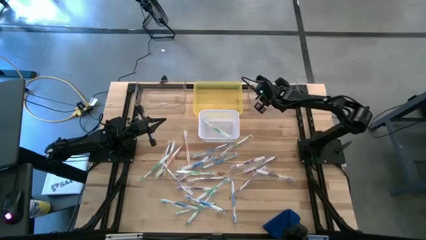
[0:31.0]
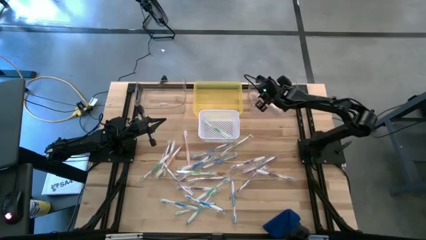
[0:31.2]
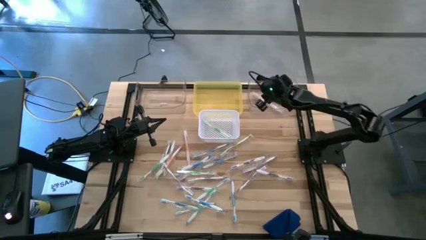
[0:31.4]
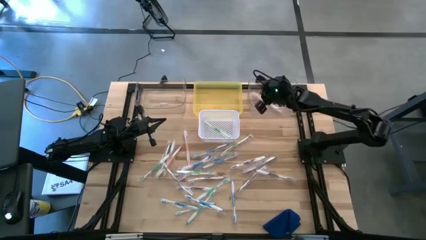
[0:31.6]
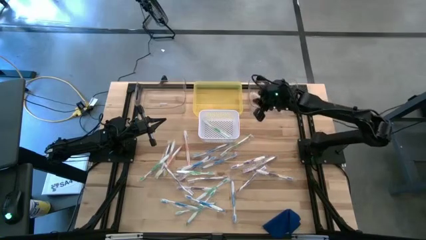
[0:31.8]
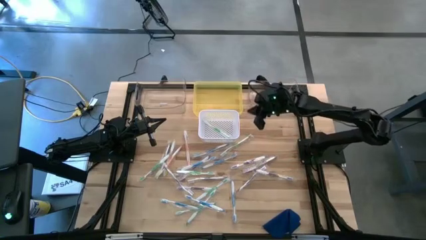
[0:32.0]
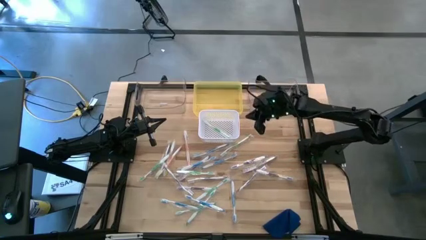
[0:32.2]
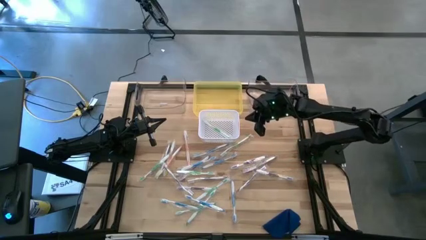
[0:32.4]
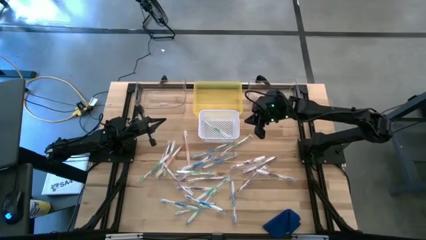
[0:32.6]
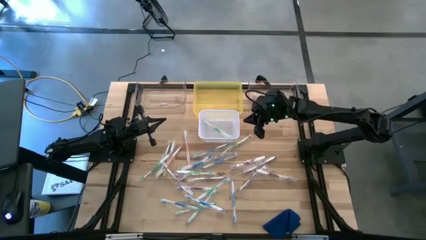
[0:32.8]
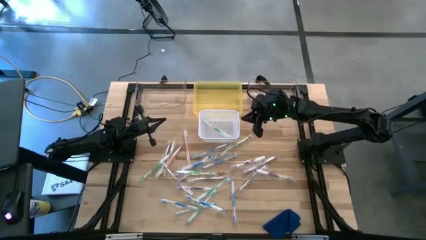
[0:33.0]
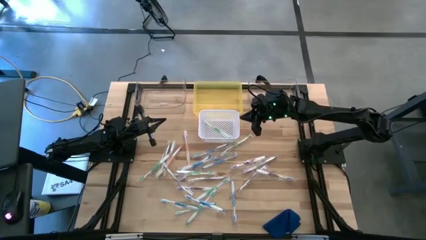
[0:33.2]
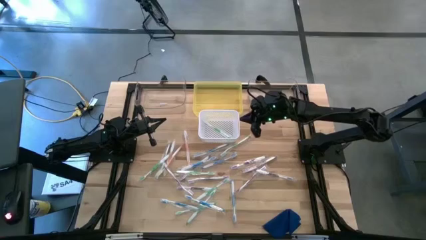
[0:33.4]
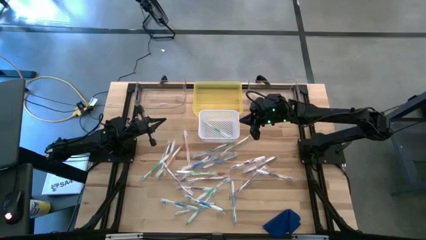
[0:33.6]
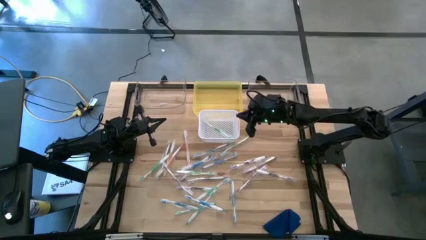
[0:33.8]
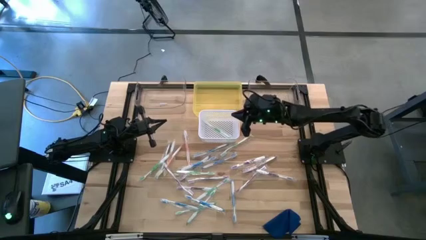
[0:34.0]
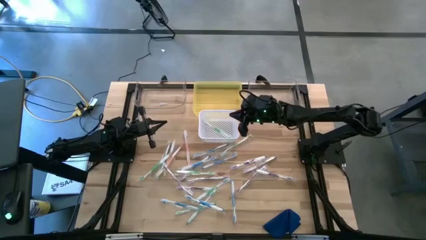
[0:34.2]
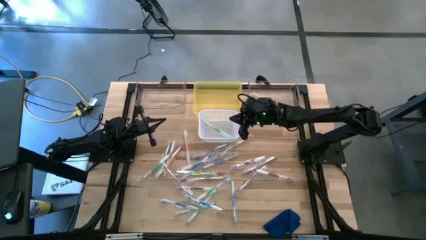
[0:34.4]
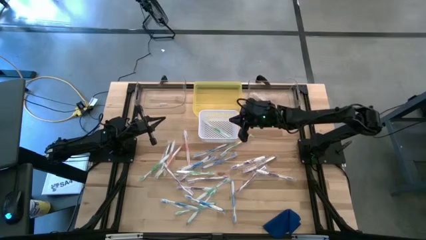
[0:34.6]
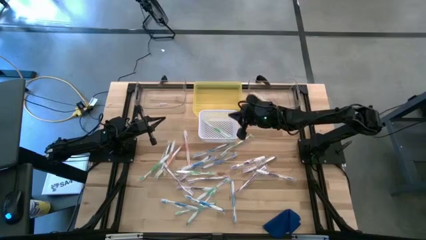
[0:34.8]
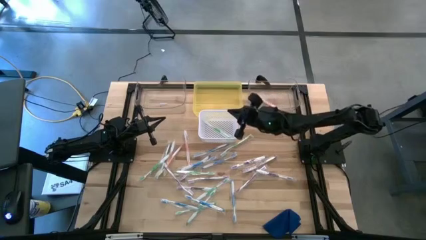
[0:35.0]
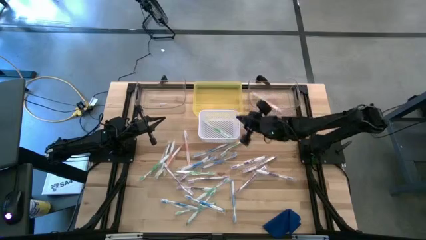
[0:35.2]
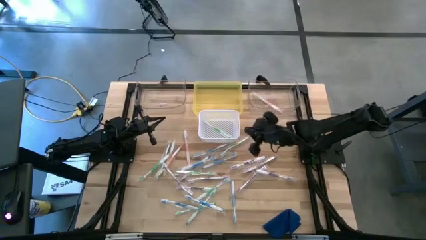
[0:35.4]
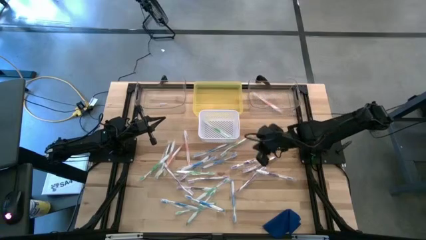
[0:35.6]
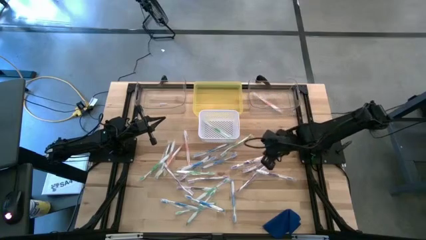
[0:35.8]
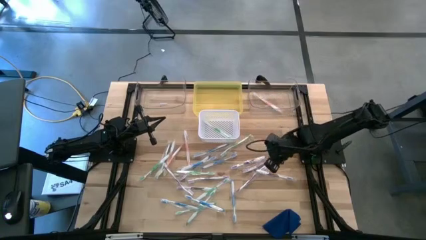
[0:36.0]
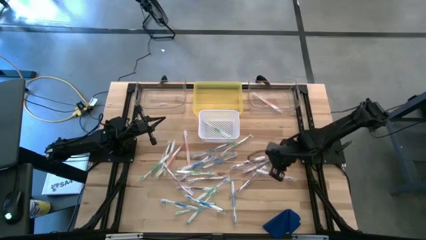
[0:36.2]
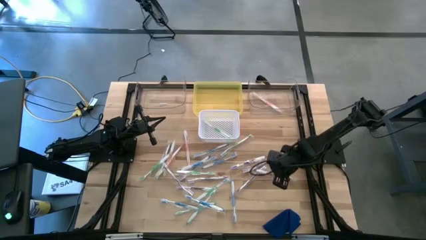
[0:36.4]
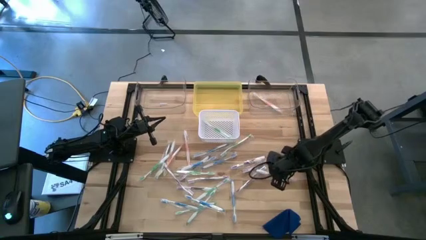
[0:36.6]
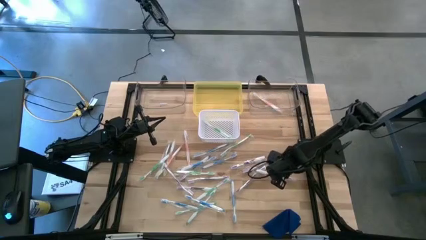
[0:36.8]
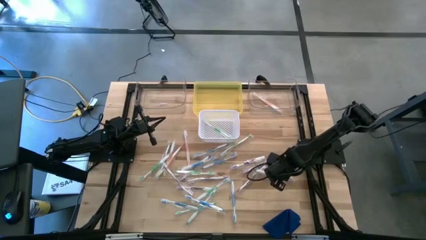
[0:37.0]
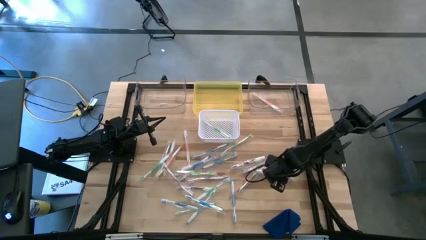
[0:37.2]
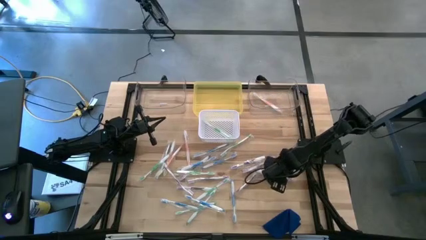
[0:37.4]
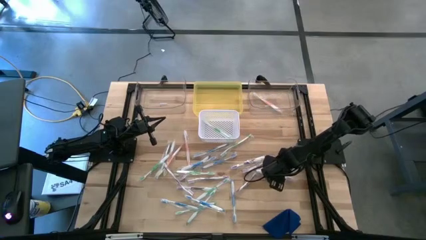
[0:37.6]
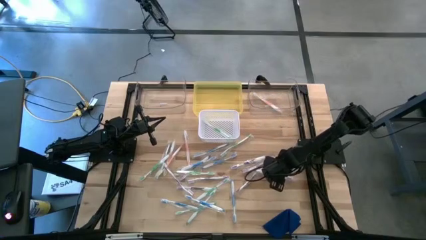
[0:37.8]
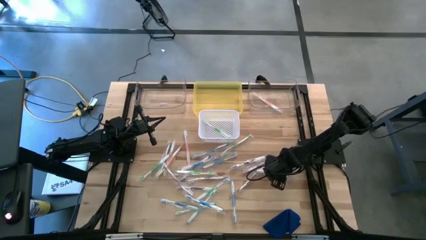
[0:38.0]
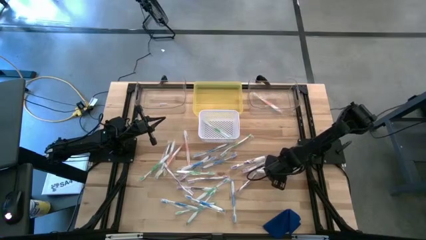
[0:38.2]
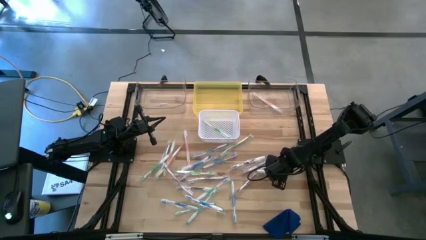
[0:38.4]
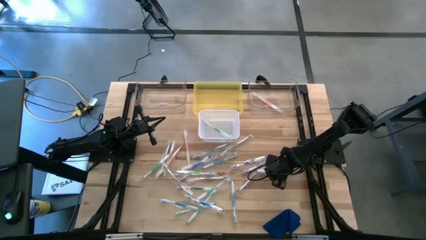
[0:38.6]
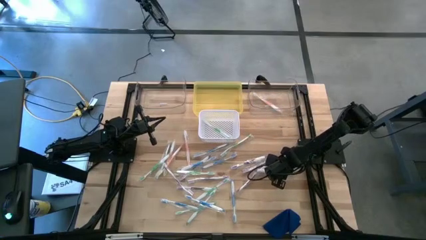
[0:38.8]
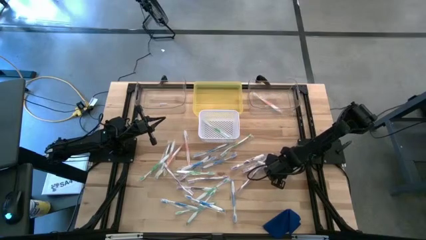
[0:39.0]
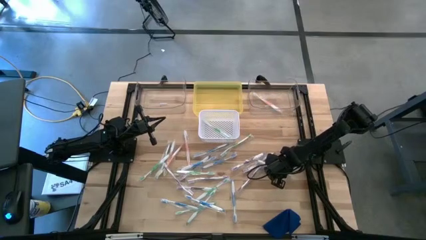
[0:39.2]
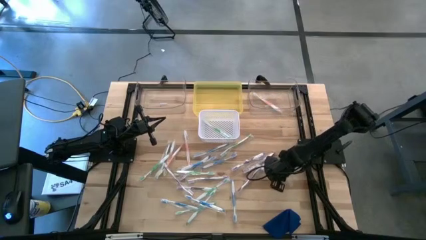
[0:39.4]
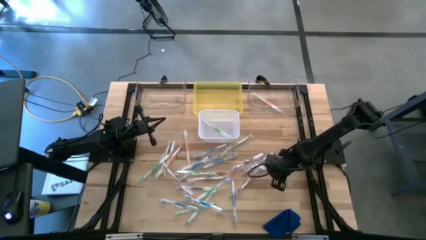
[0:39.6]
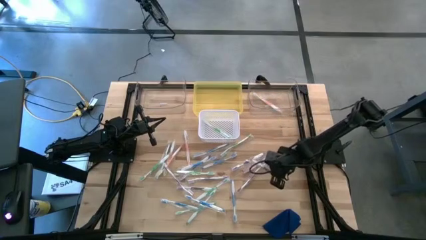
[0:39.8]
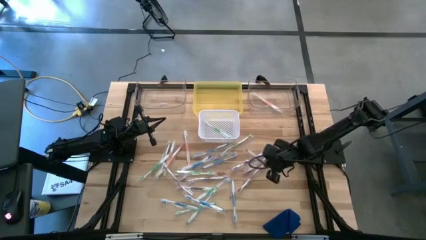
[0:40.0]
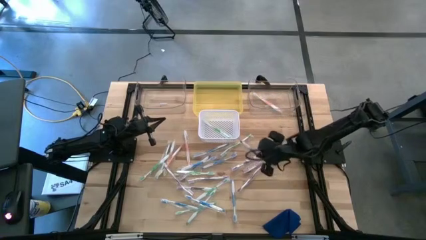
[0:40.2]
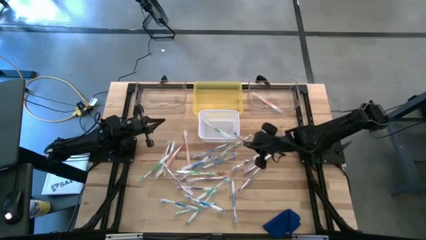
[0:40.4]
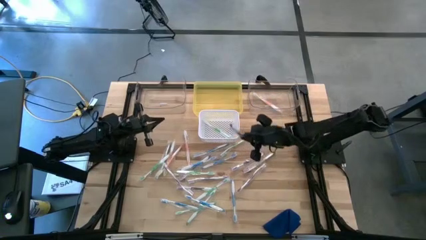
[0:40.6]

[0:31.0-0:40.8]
Task: Pick & Place Toothbrushes
Put the purple toothbrush into the yellow bin

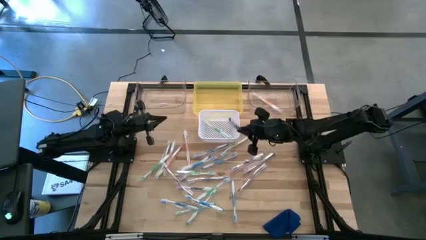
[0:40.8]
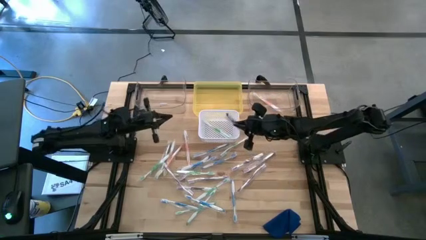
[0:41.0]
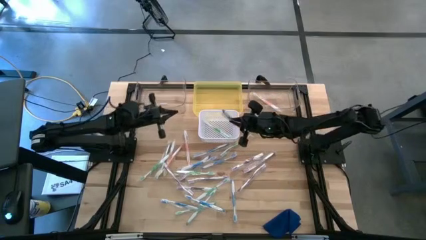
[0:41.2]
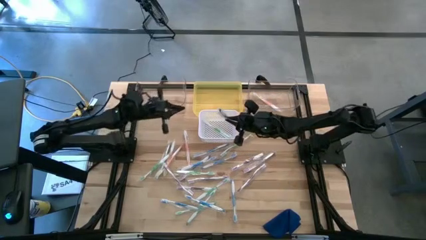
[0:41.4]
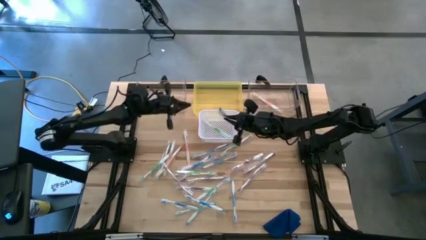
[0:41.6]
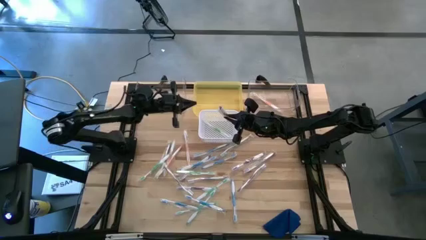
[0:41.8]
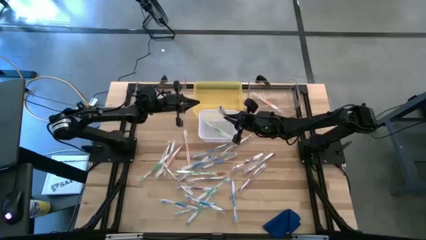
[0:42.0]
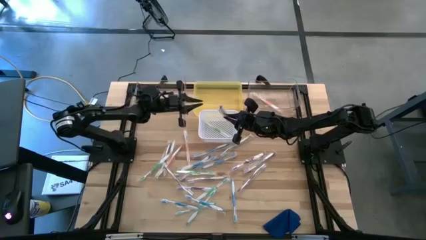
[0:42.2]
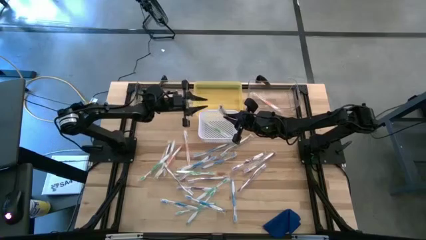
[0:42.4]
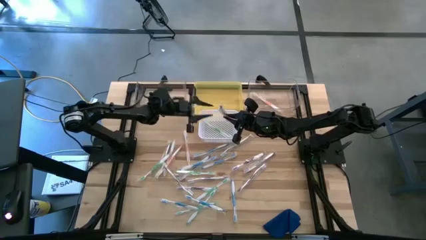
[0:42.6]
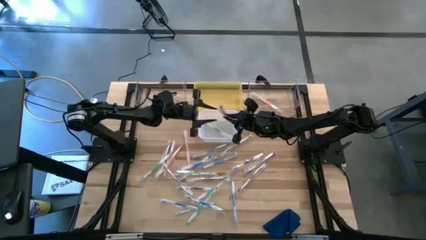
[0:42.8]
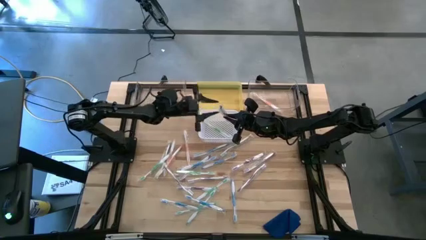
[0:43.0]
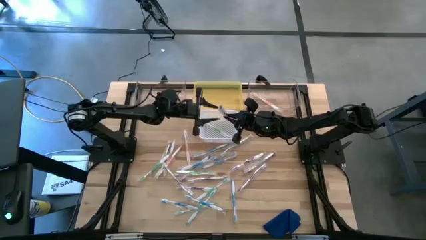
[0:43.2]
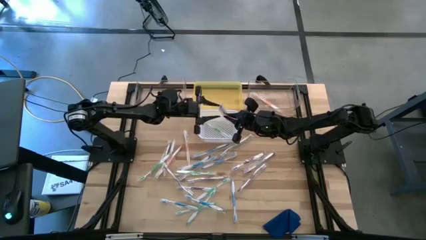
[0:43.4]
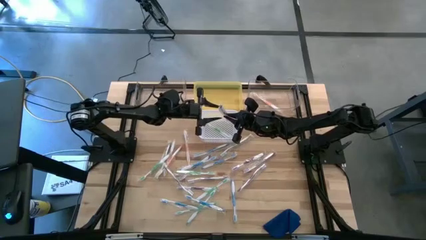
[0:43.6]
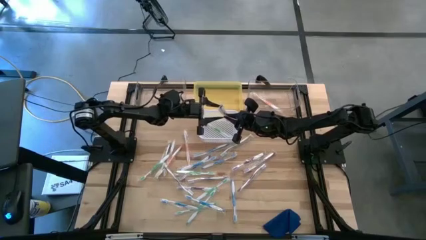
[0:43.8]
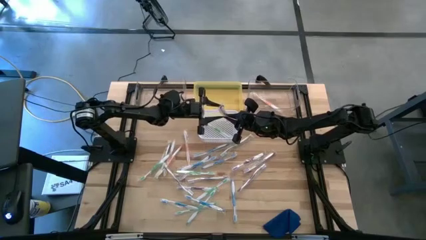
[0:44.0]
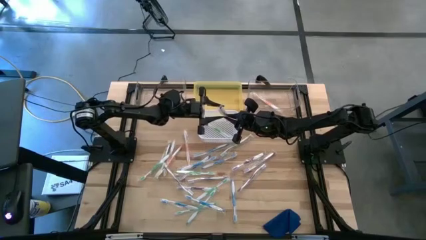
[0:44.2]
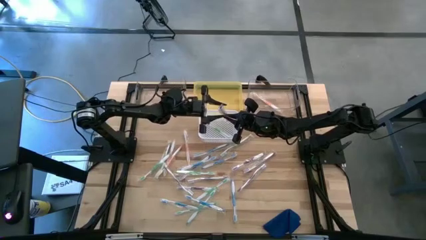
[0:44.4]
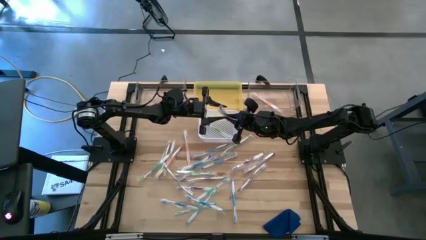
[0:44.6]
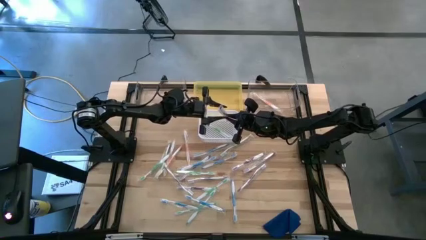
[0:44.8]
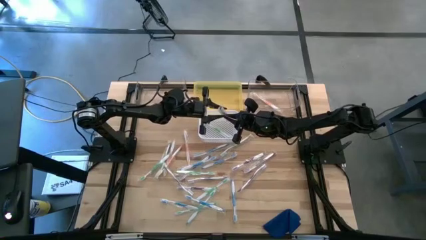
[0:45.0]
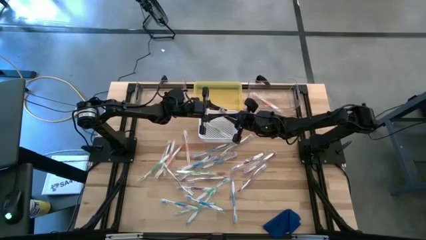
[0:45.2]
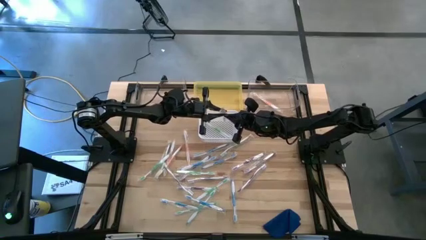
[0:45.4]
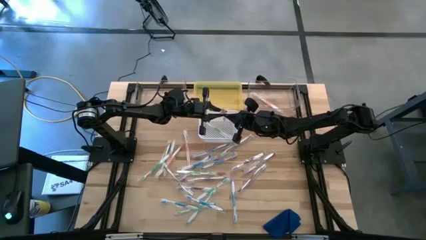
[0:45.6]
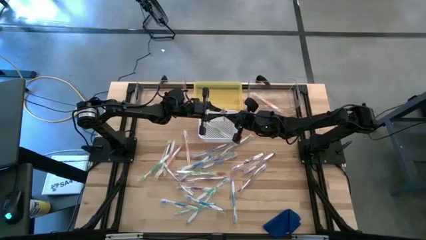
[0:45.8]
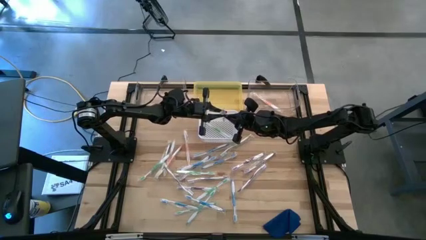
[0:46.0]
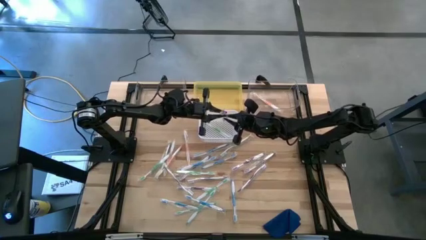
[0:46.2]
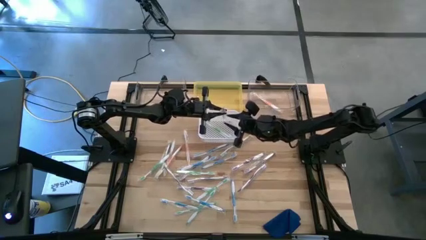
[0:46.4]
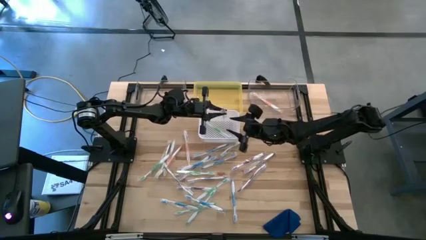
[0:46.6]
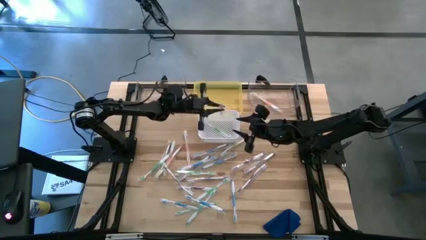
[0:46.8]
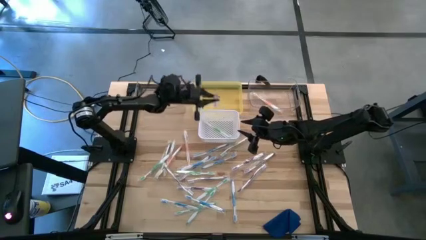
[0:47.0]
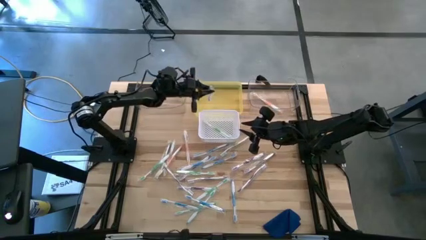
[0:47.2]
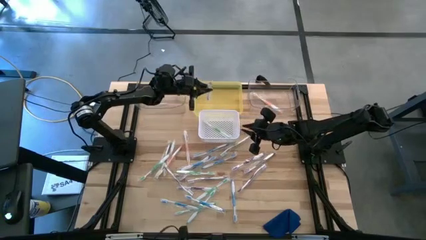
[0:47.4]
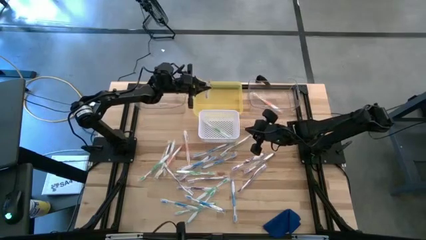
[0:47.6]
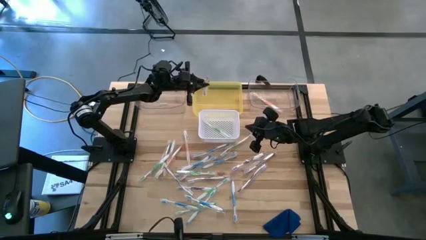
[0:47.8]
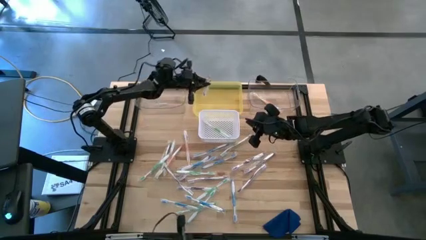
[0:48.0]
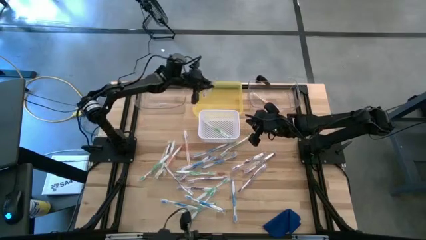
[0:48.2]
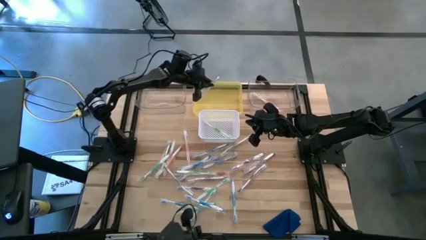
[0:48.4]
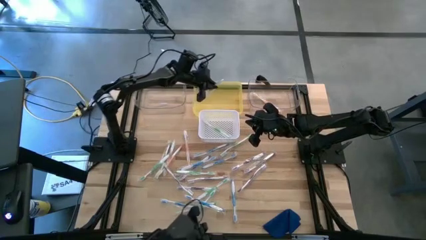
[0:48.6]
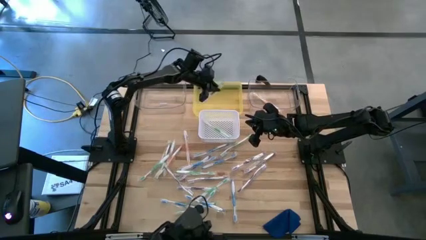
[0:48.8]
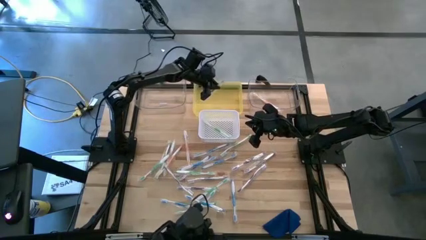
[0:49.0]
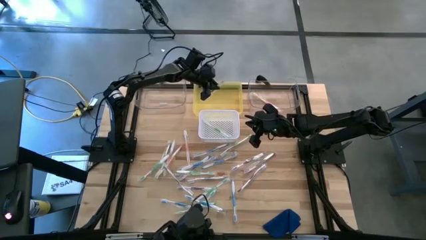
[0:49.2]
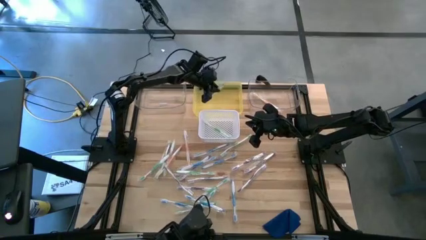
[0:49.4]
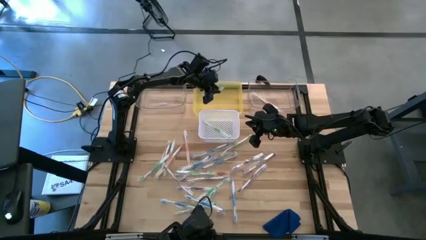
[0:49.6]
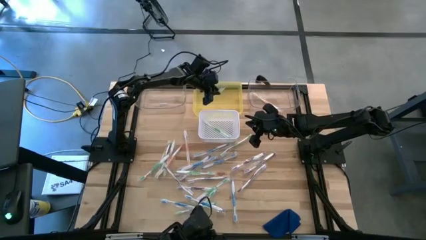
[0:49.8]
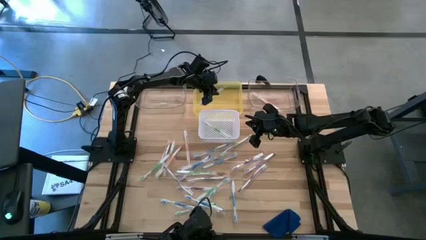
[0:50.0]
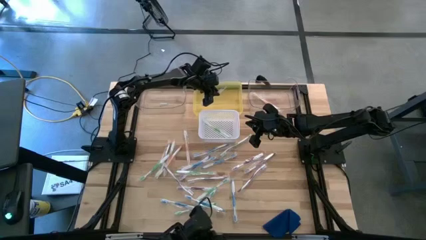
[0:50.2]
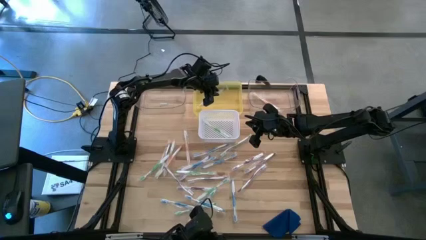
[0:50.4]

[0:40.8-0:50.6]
Put the purple toothbrush into the yellow bin
